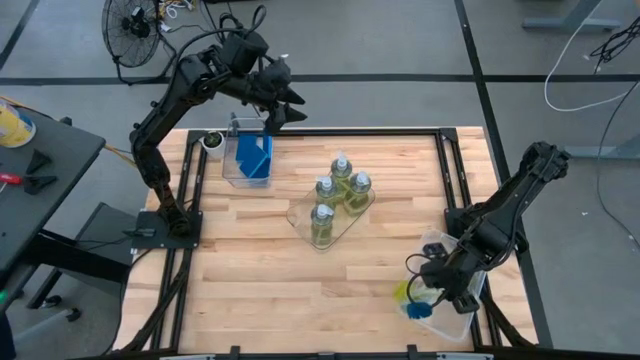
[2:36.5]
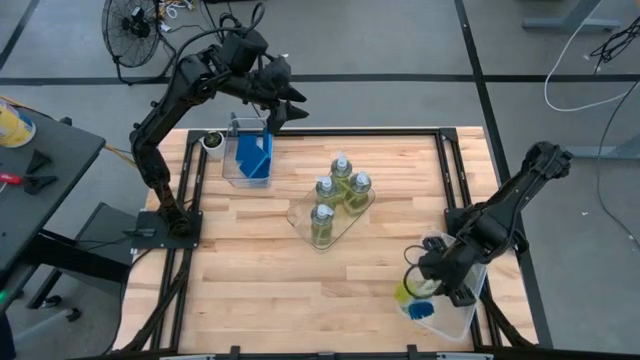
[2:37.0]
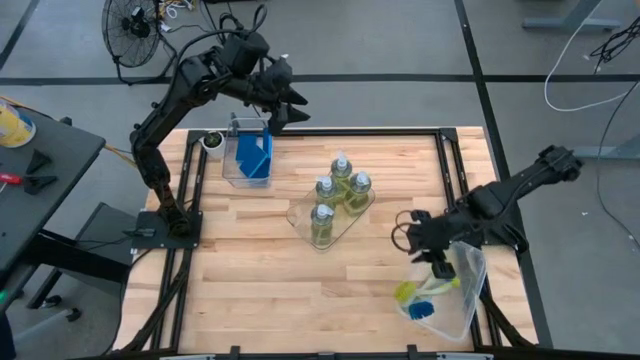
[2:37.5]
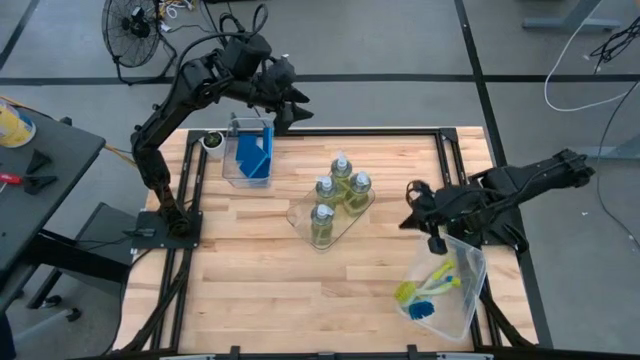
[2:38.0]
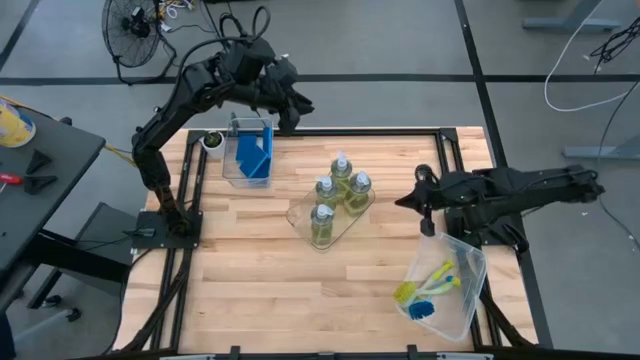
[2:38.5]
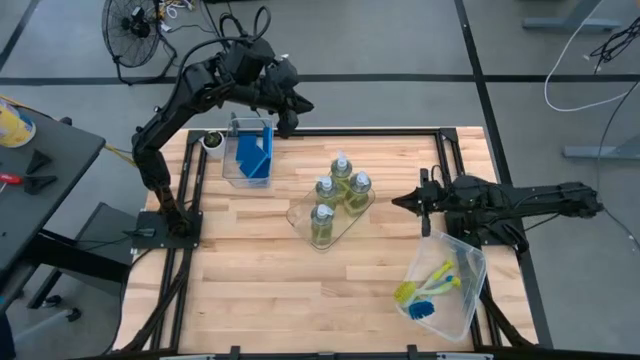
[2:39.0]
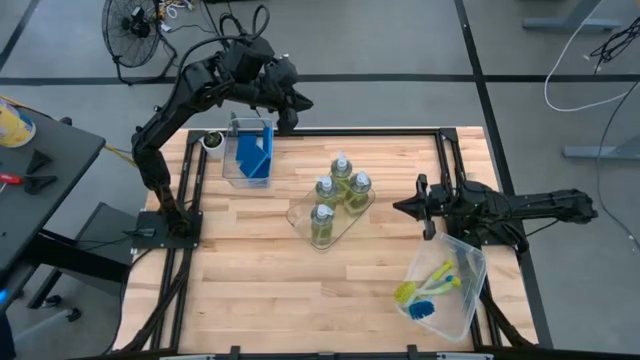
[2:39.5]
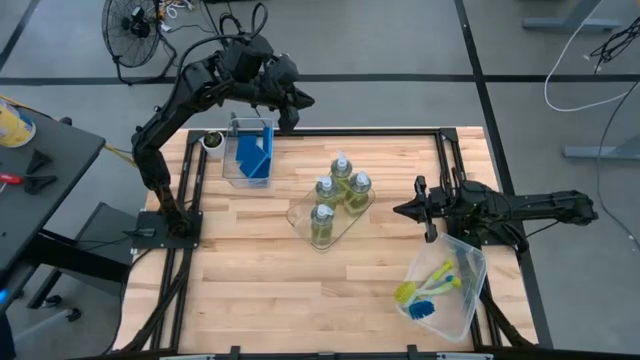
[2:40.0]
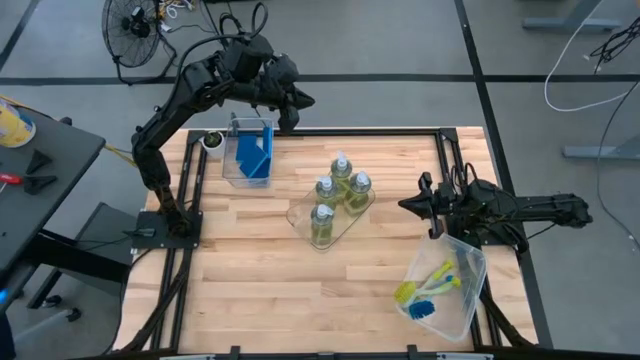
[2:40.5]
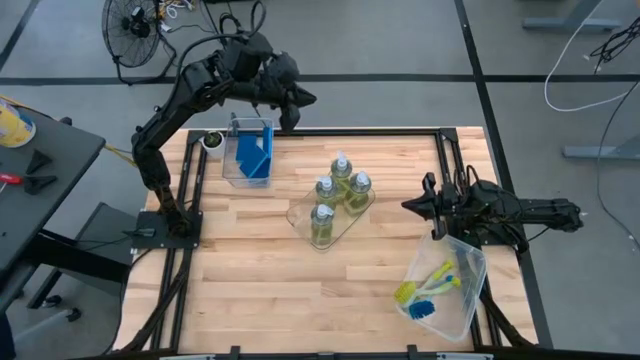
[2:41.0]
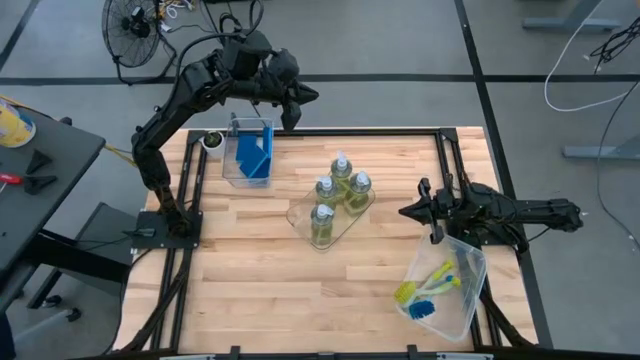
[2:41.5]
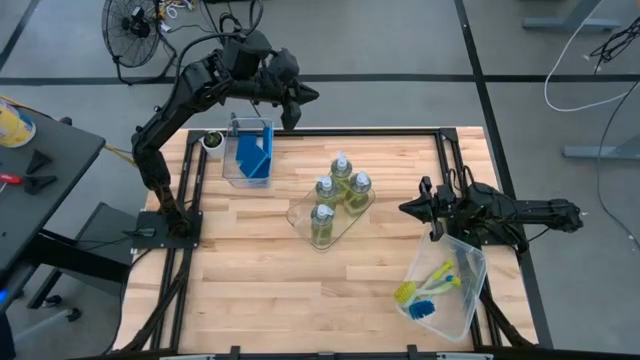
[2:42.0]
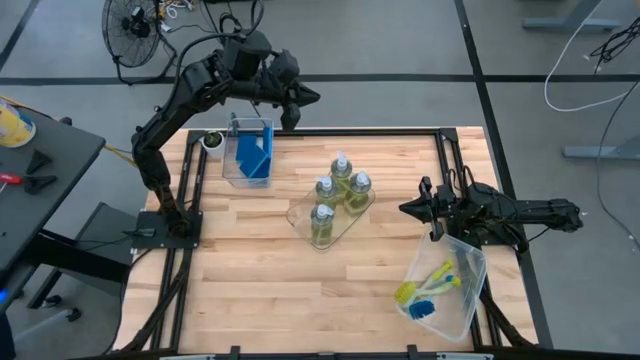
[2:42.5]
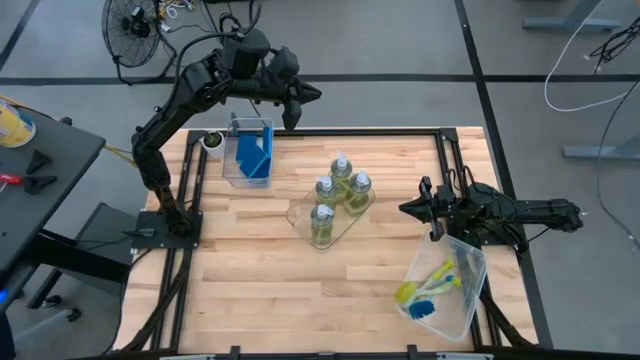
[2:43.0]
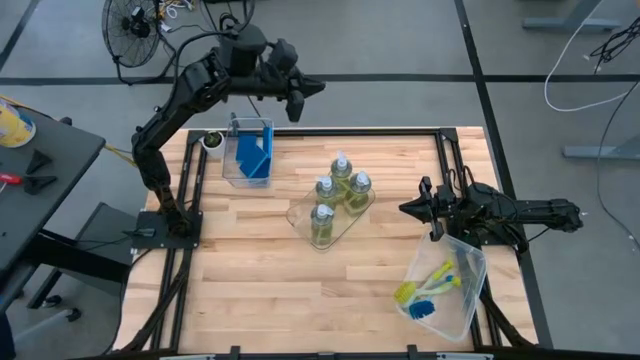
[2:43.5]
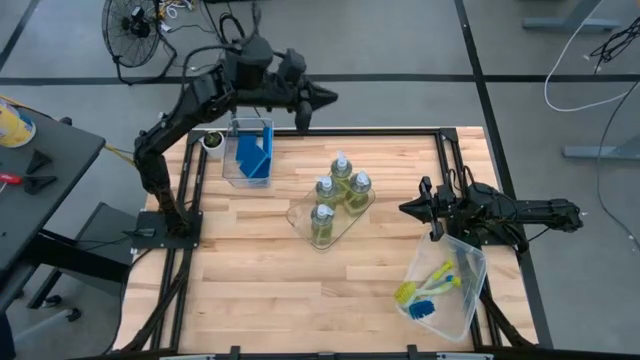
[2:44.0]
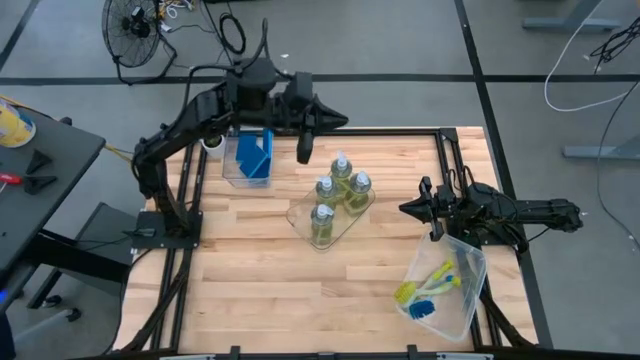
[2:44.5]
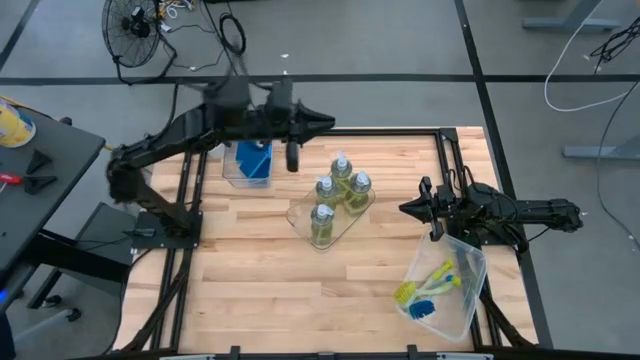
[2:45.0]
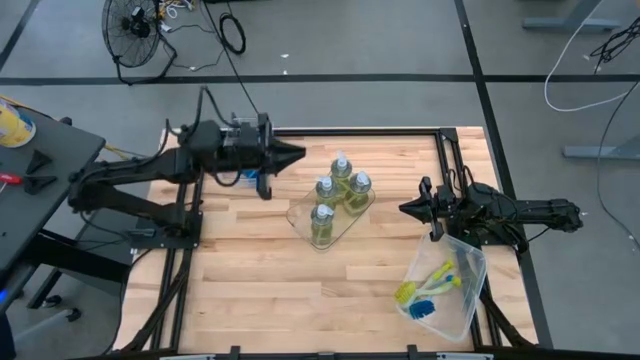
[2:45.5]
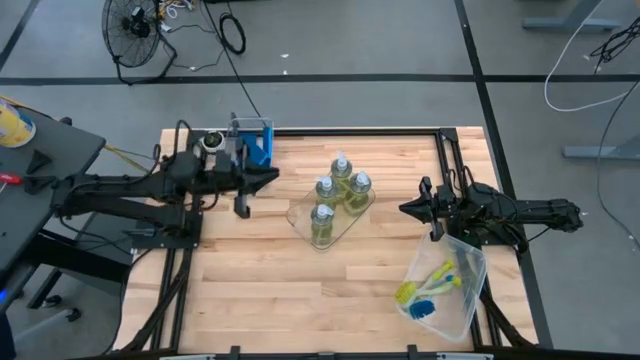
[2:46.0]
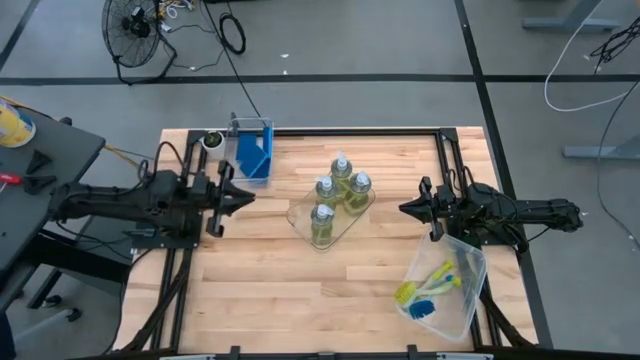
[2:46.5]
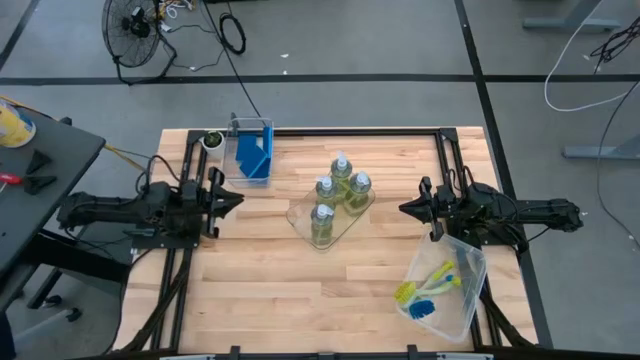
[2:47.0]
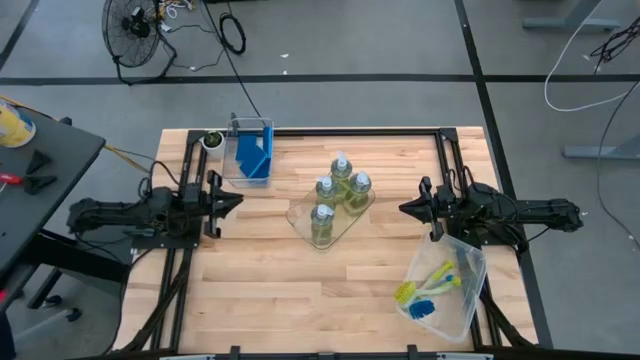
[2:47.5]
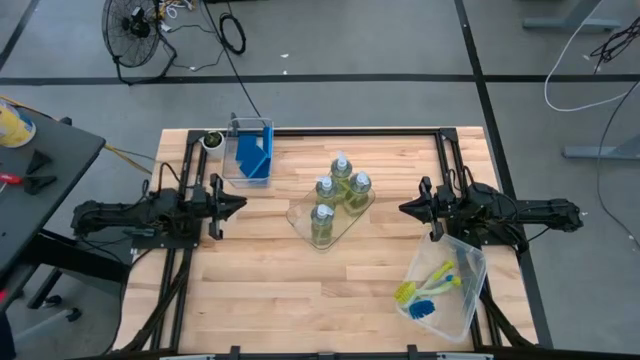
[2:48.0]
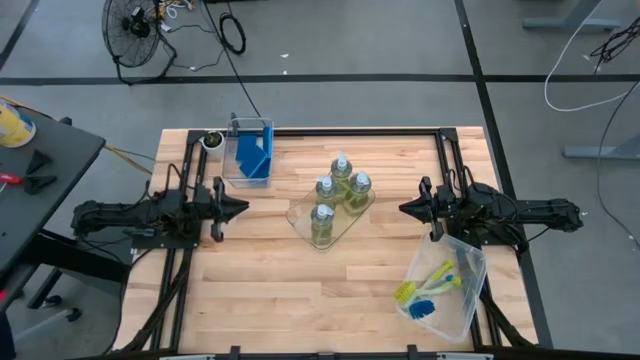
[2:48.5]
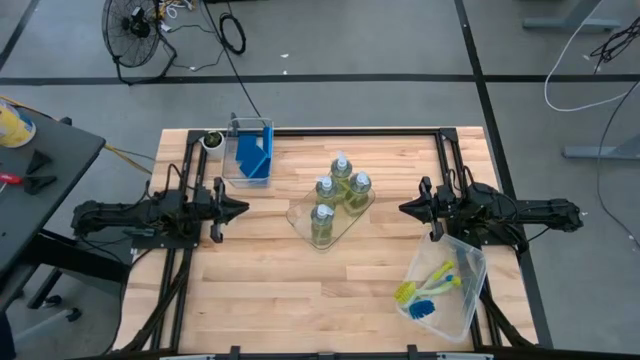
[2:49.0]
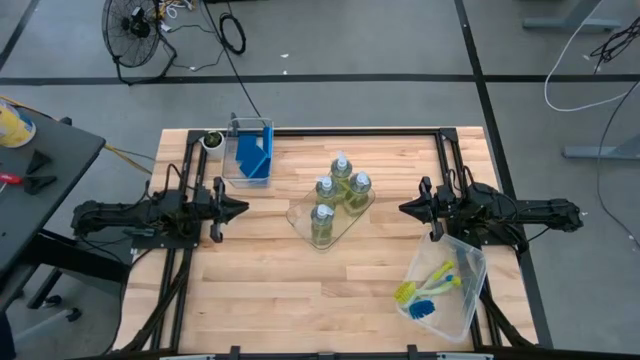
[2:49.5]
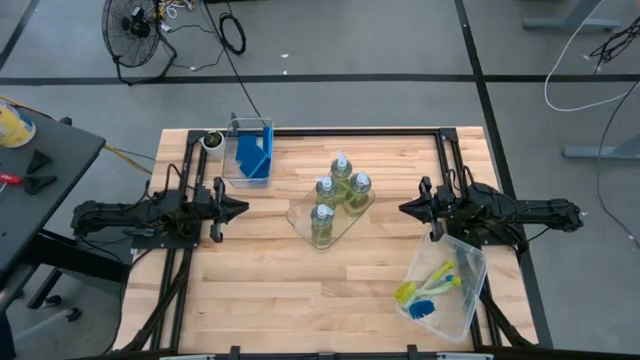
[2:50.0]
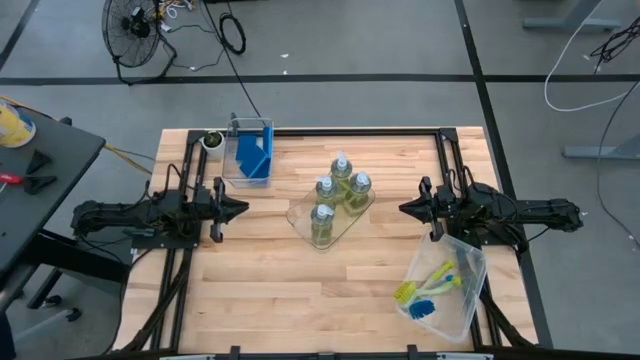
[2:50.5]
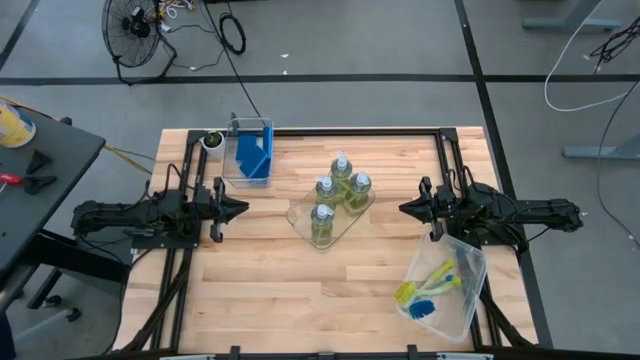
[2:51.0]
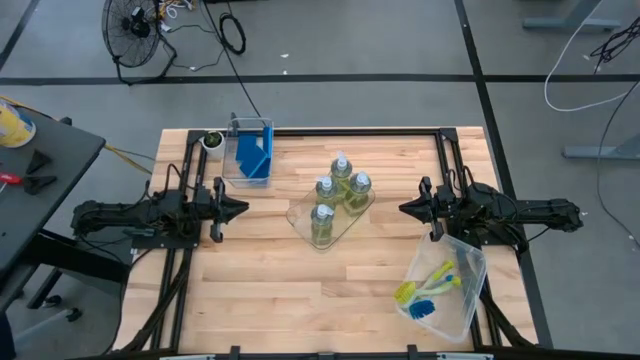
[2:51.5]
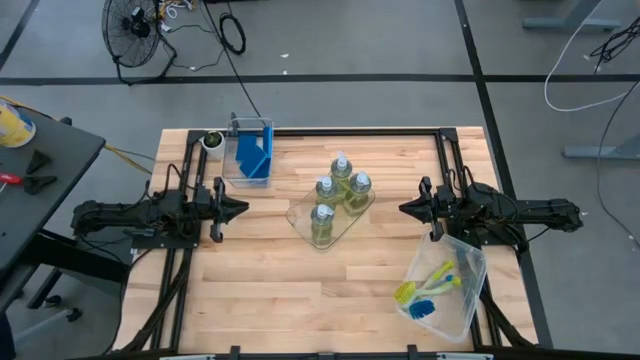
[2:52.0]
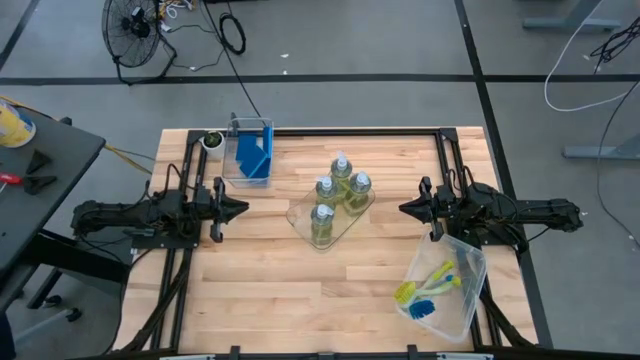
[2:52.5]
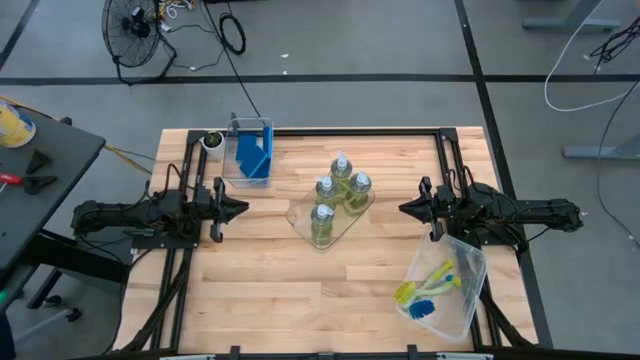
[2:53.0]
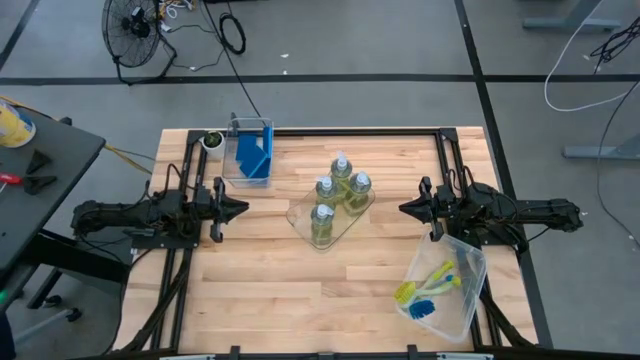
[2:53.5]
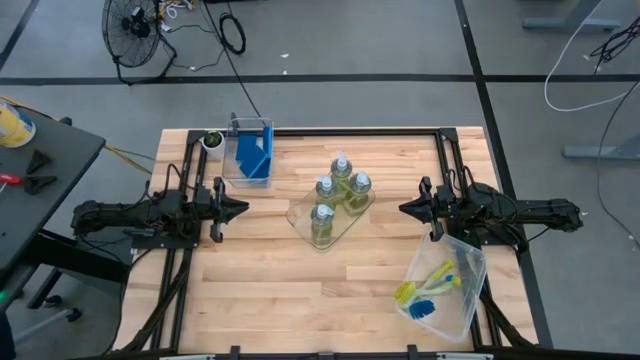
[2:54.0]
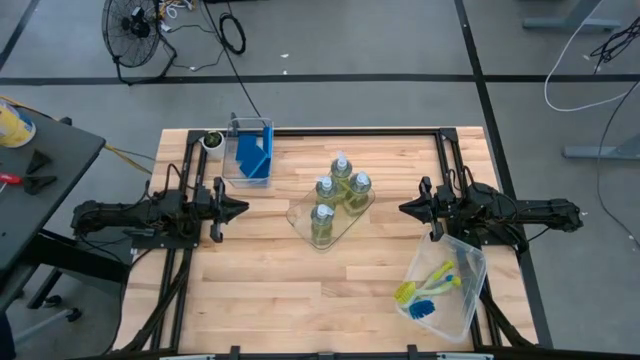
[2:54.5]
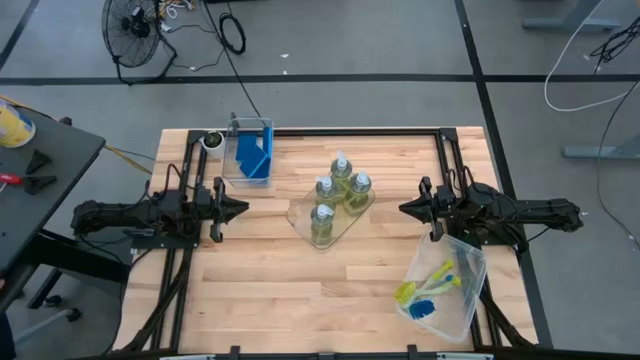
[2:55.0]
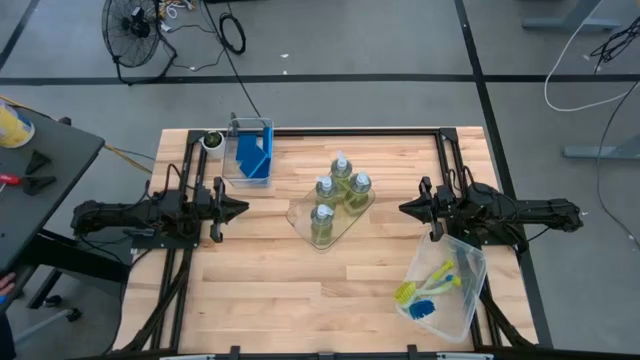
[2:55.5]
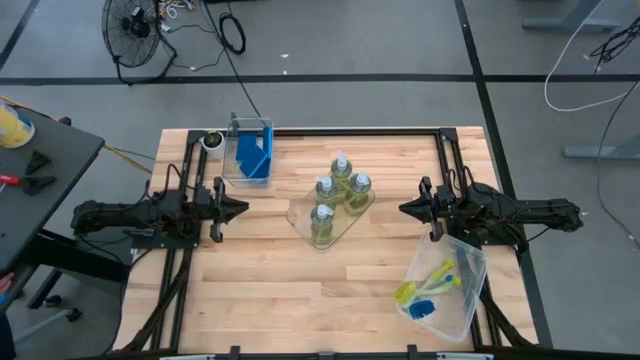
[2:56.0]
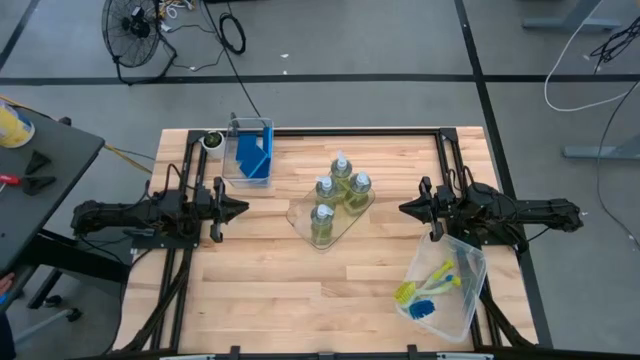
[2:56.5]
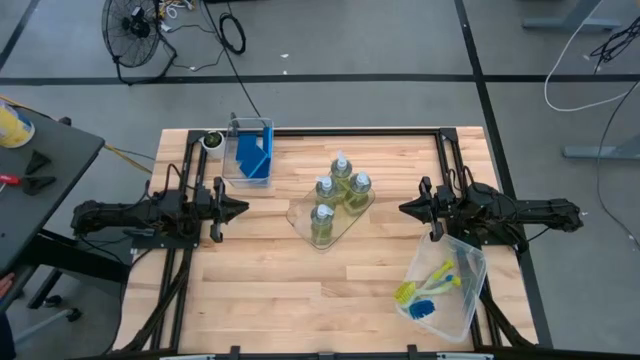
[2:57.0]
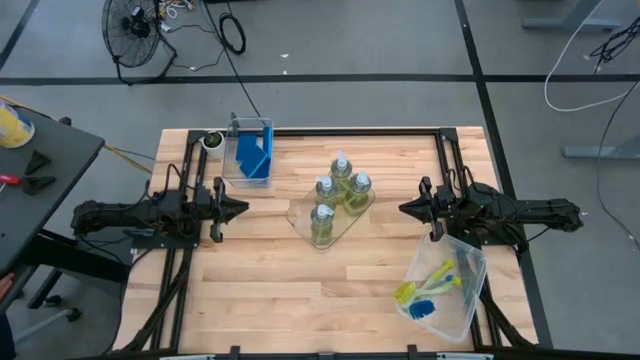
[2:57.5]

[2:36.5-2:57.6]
Task: Pick & Place Kitchen Sink Supplies
Return to Home Position
